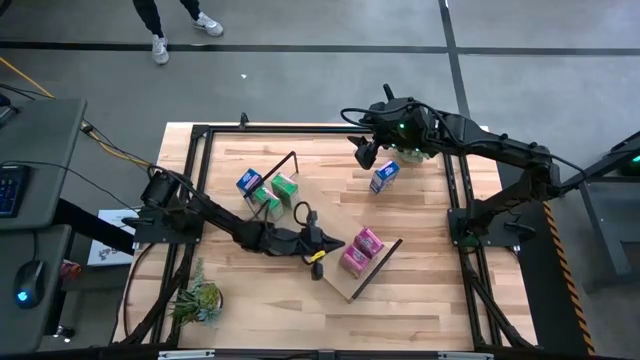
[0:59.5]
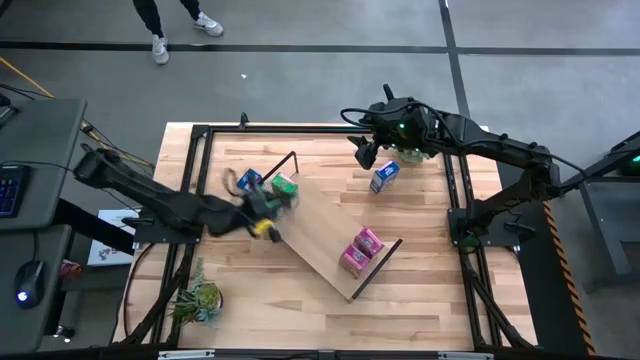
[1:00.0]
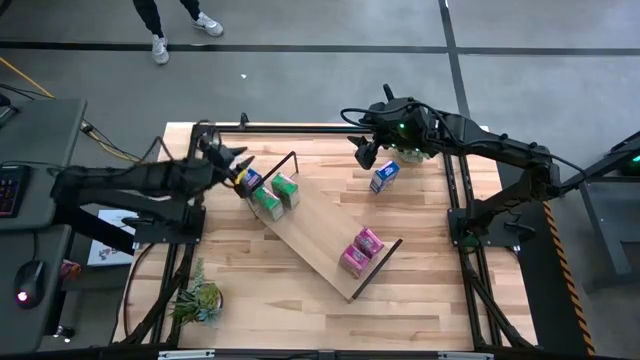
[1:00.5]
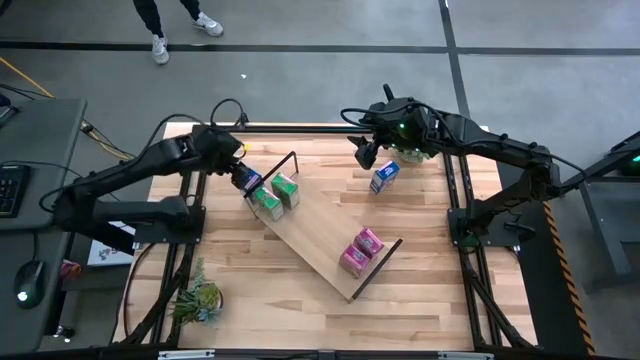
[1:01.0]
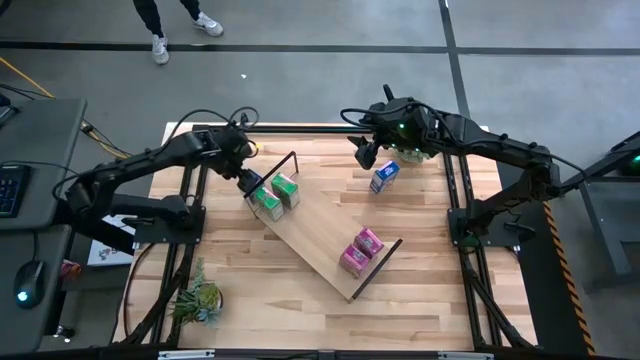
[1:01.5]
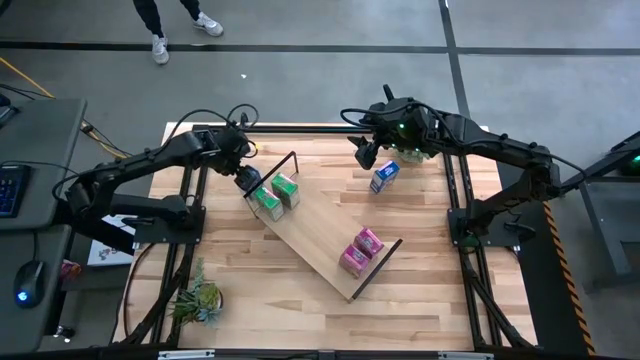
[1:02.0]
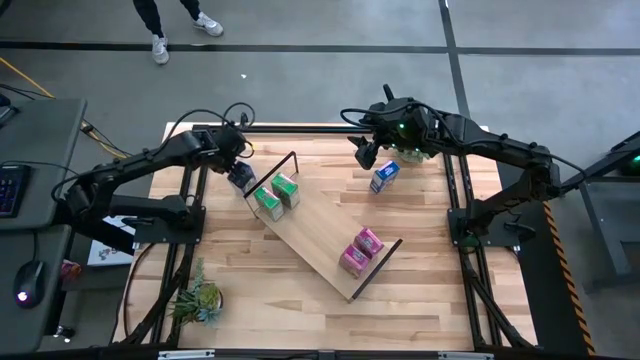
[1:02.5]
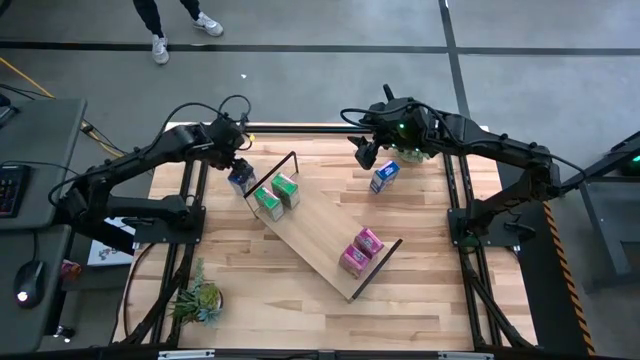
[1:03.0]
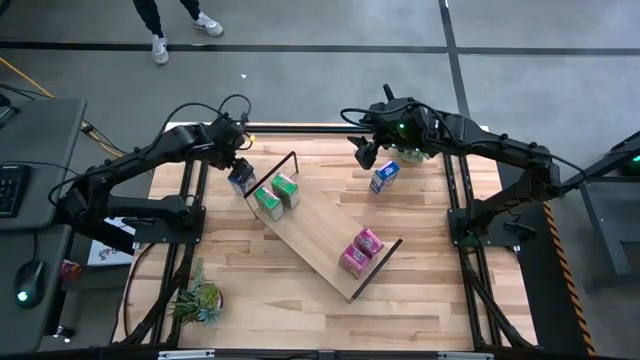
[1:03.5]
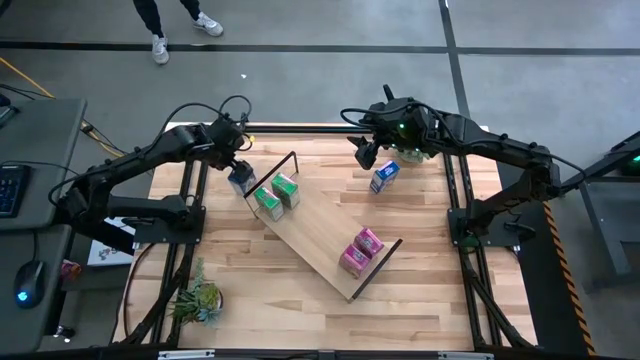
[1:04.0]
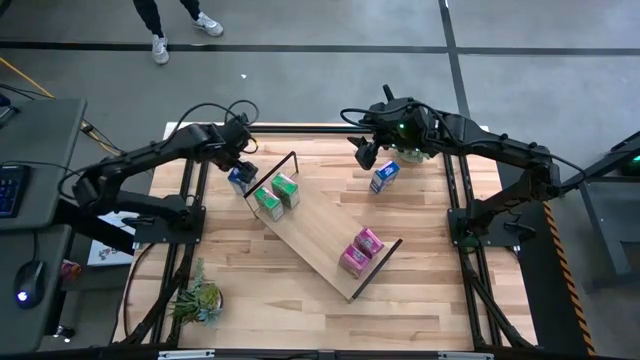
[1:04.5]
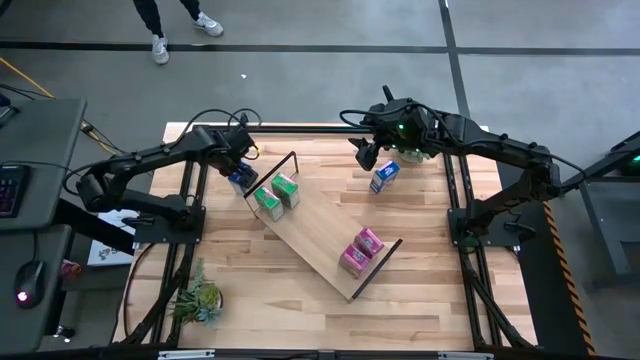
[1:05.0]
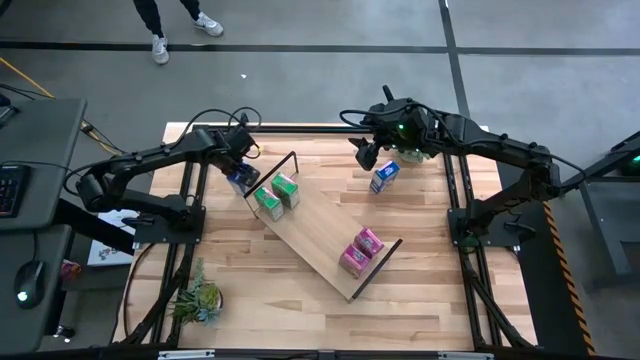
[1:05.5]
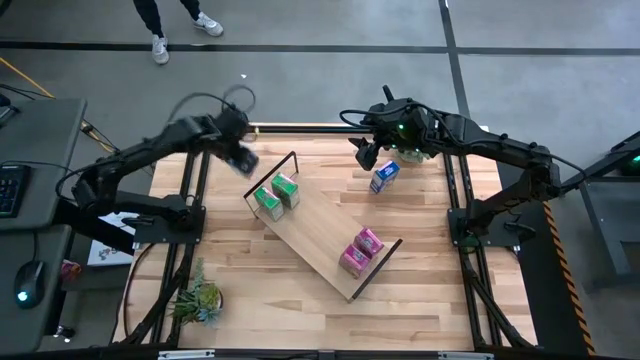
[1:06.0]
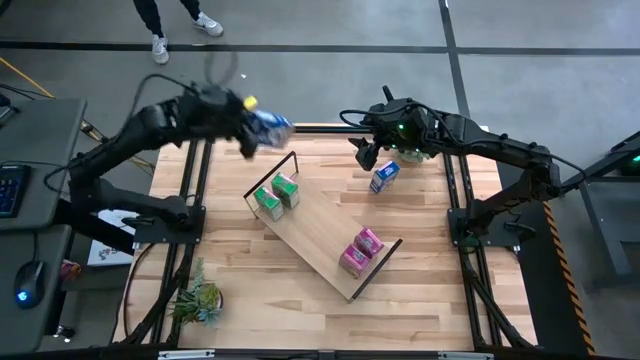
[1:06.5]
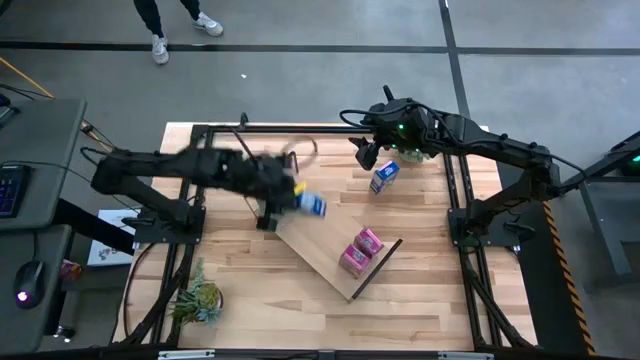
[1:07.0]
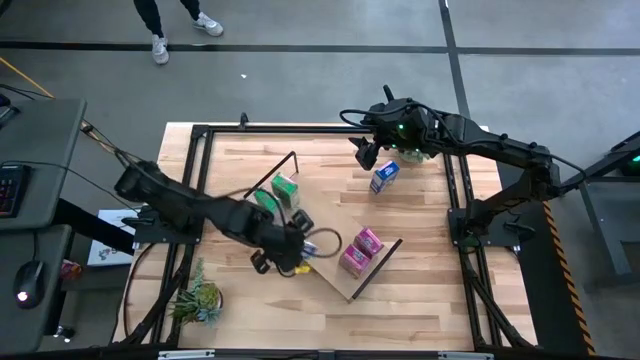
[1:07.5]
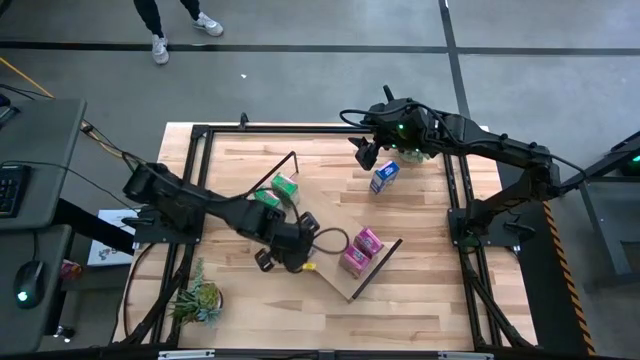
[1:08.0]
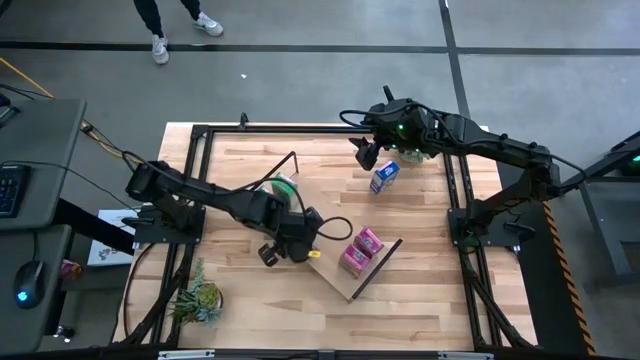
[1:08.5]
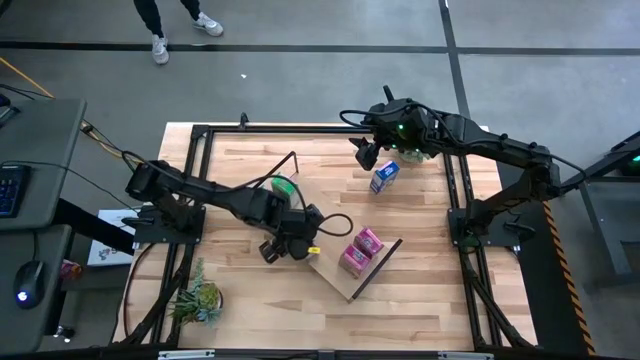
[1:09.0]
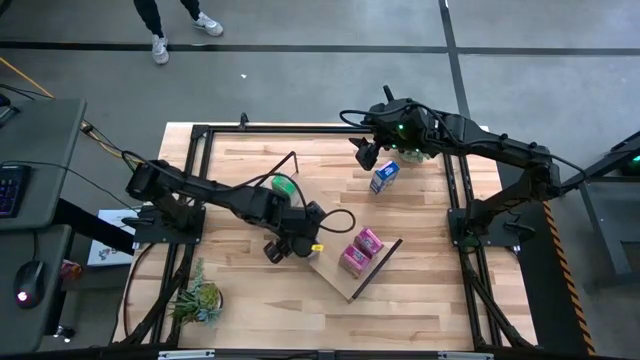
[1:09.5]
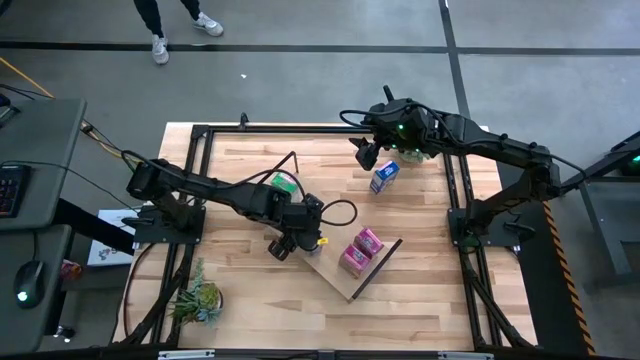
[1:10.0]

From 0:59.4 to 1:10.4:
Task: Stack cereal on shelf
Put the left blue cereal box on the shelf

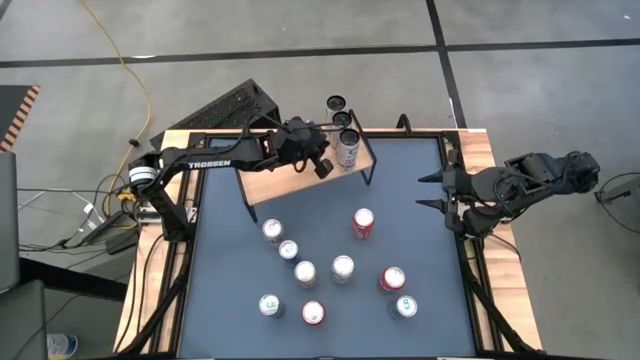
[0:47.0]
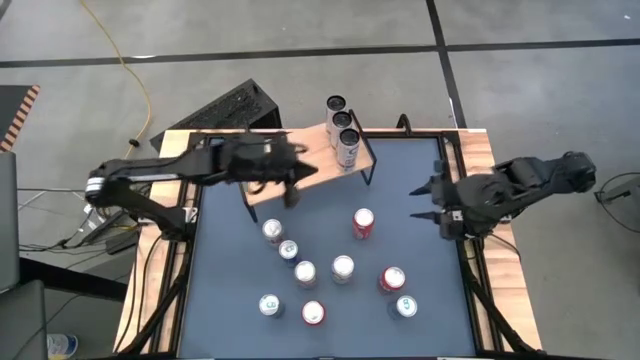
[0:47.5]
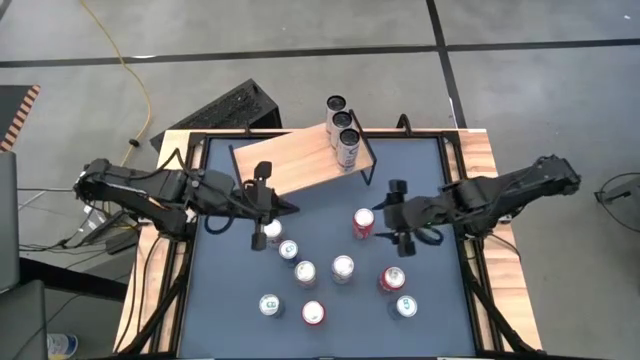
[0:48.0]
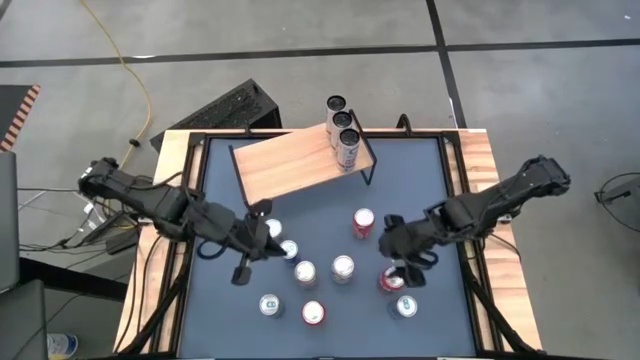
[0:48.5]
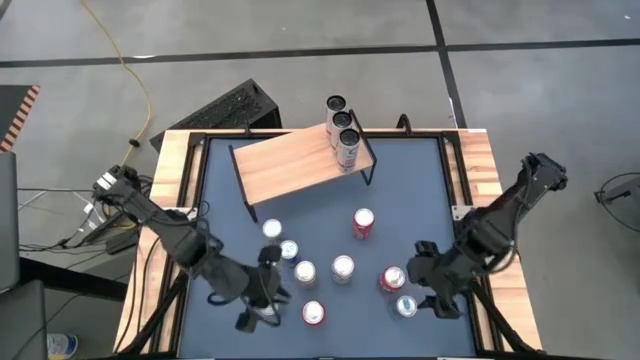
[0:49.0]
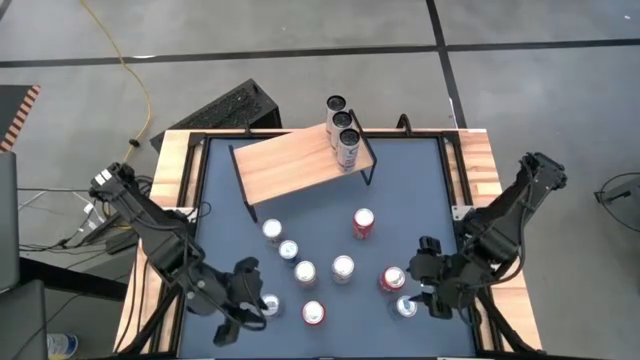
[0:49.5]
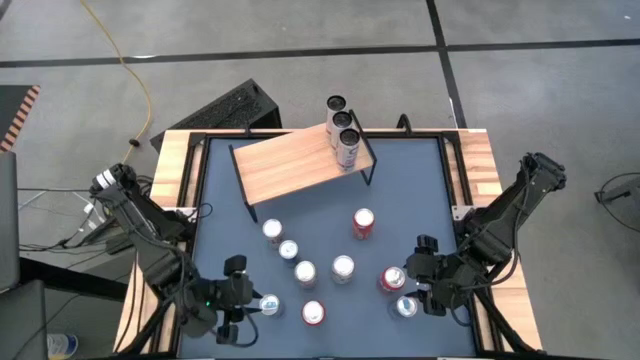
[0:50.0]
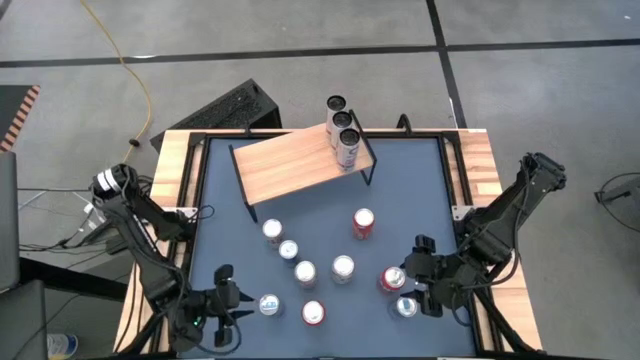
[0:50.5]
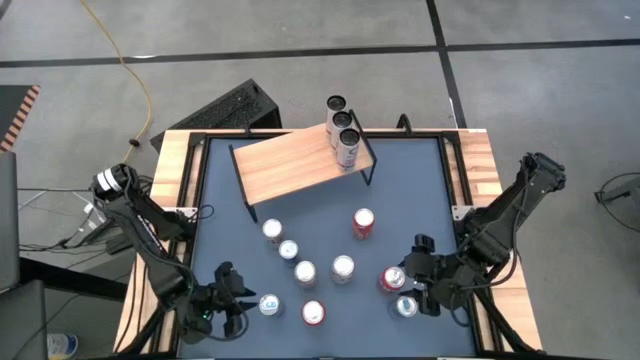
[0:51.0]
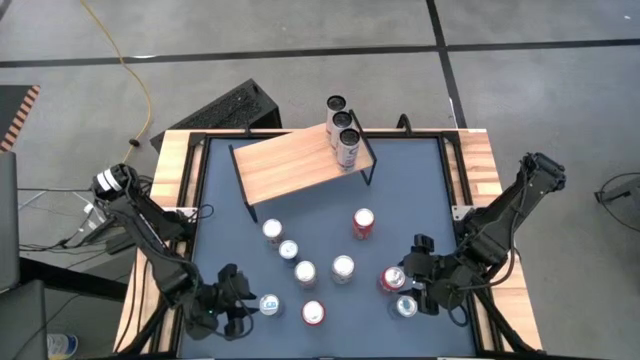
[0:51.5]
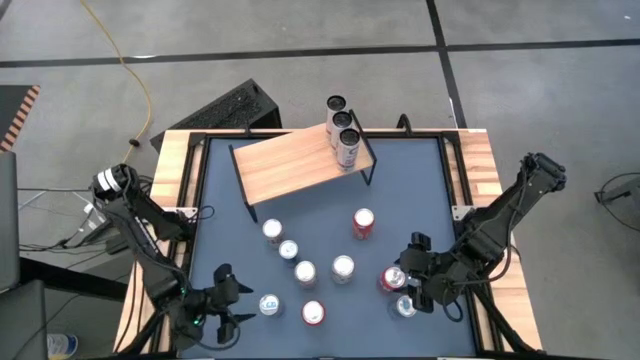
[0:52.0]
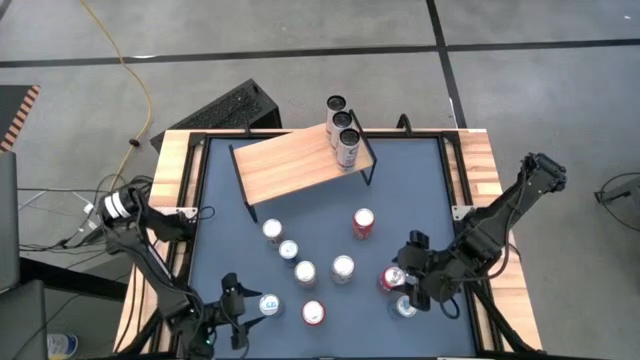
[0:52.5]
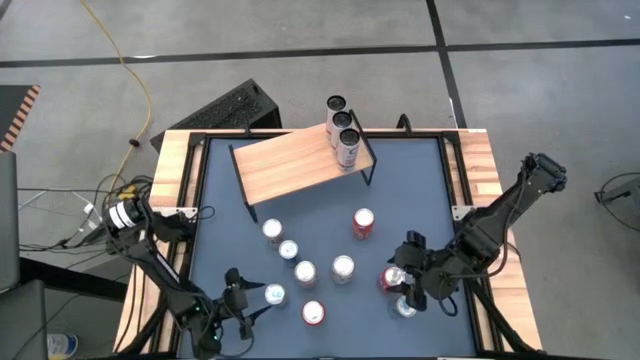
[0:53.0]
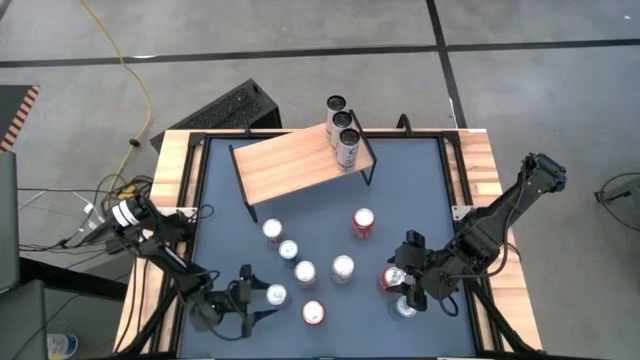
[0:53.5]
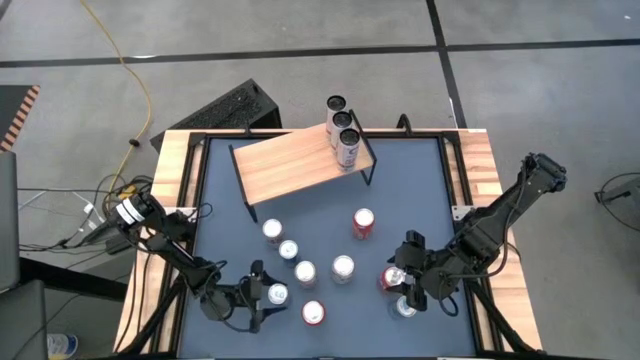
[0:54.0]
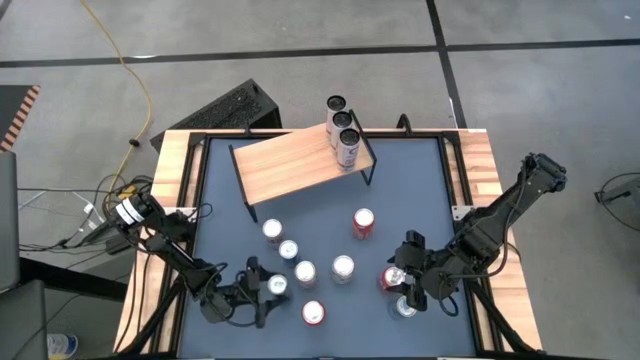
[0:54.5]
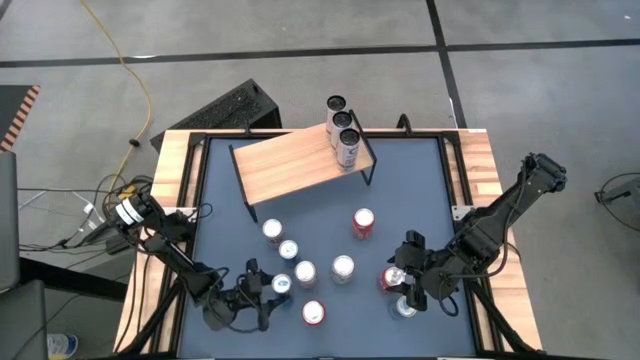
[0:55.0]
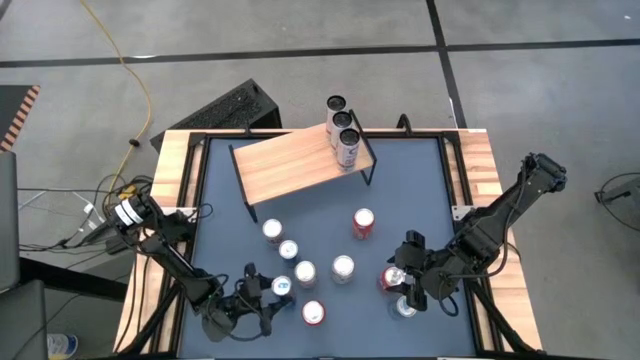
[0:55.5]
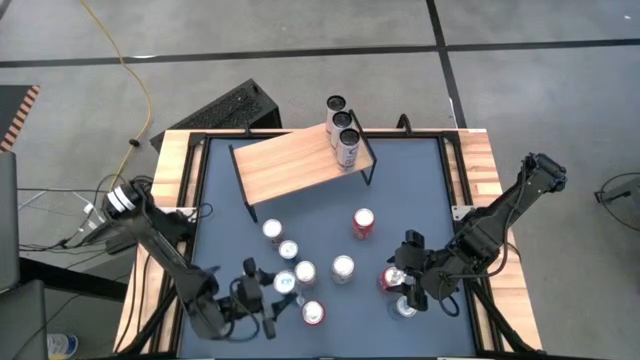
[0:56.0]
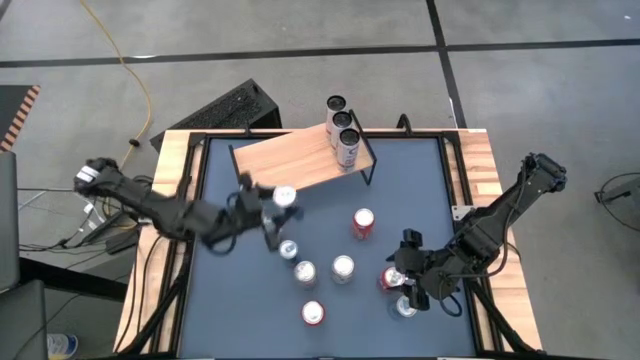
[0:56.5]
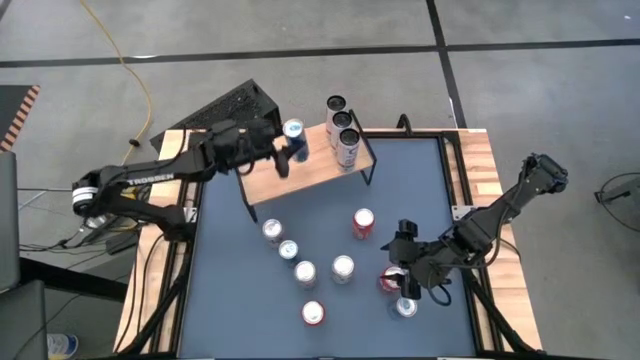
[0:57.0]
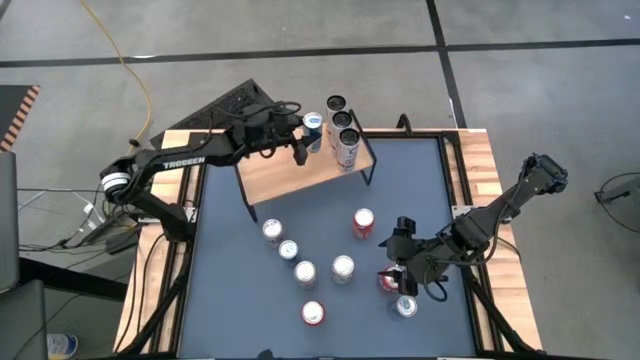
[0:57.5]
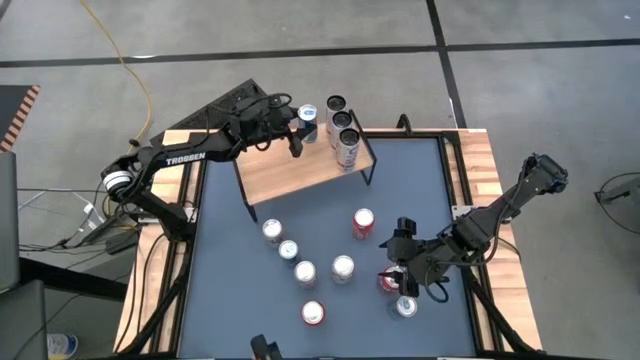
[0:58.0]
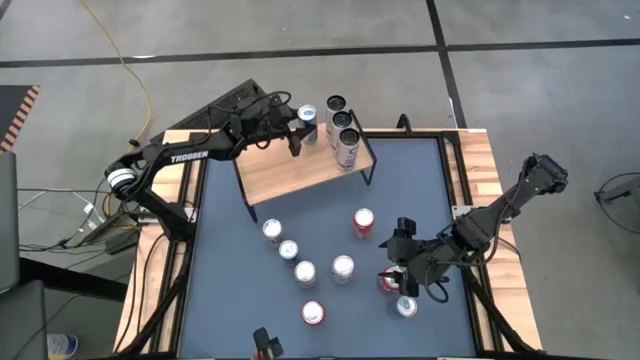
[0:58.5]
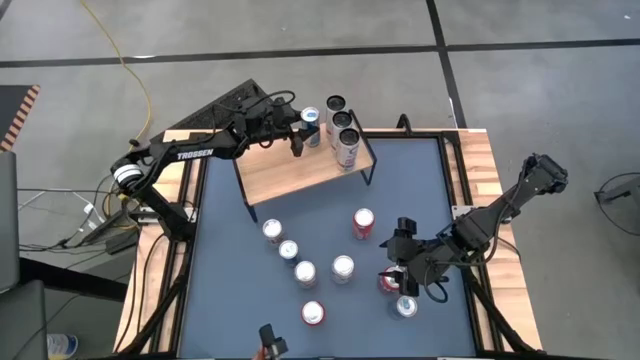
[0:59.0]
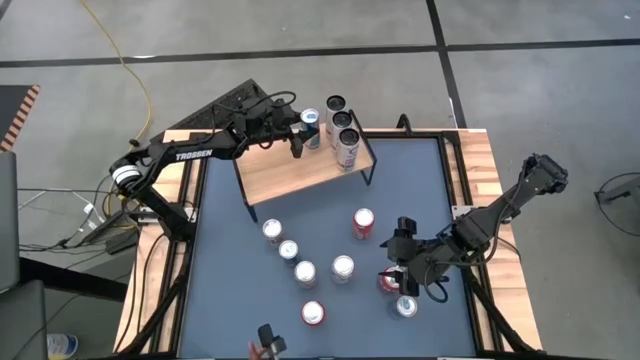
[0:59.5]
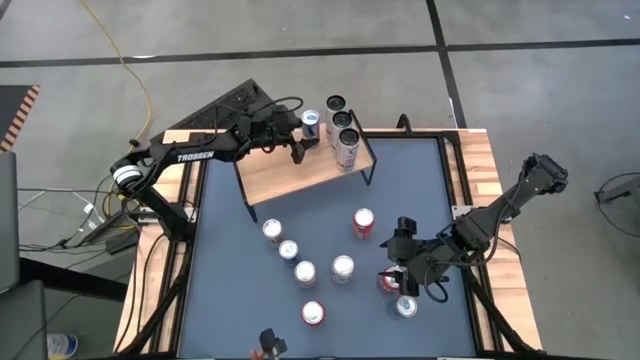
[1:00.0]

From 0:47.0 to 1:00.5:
Task: Place canned beverage on shelf
Put the left blue soda can on the shelf
